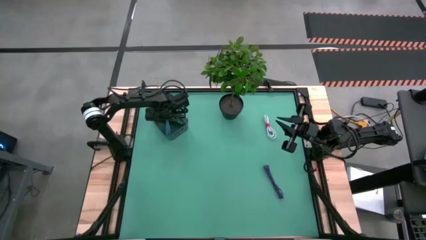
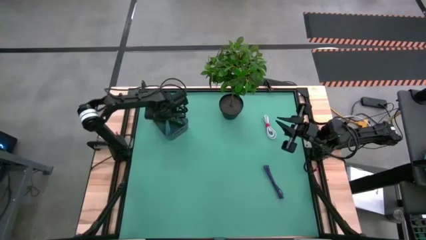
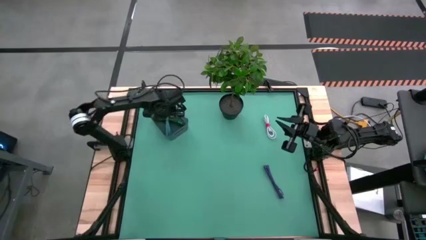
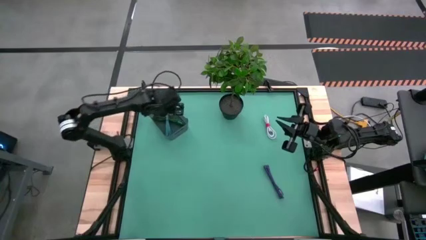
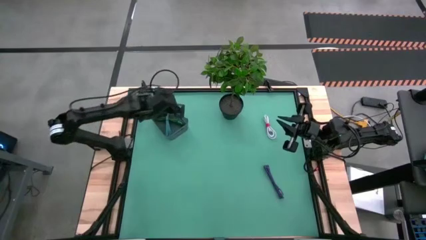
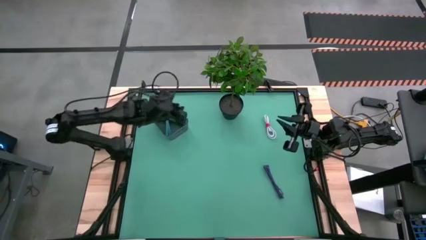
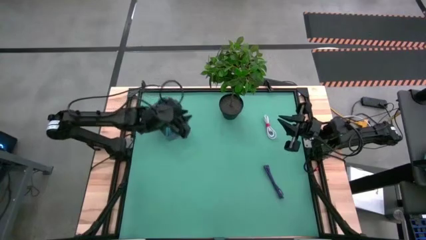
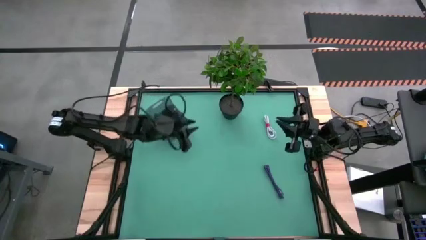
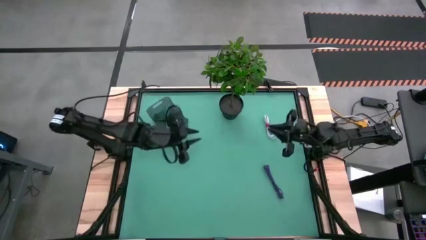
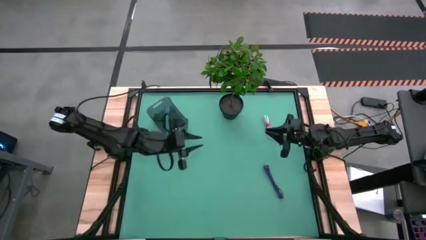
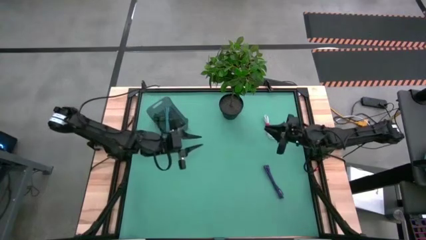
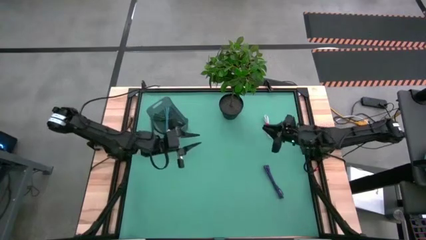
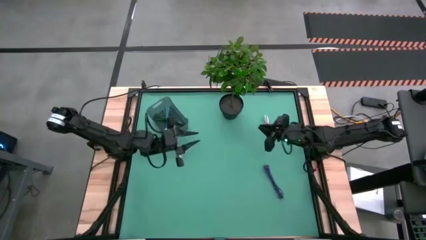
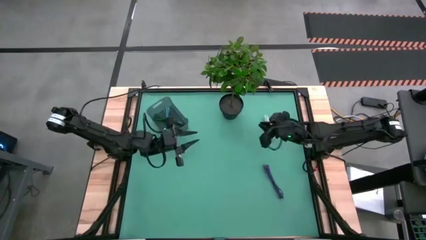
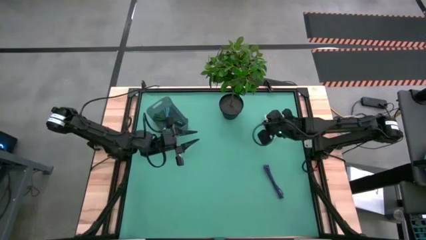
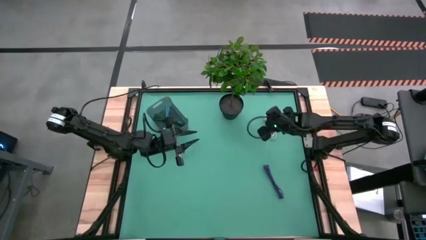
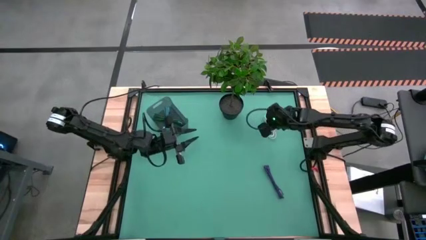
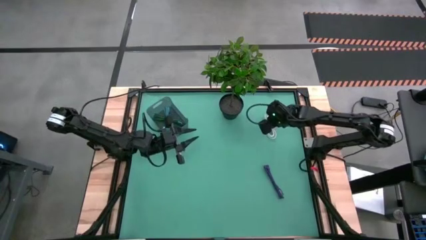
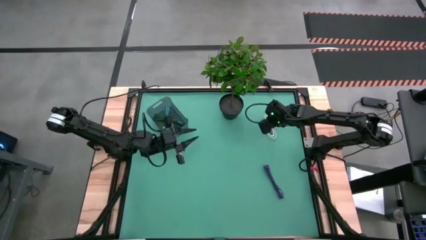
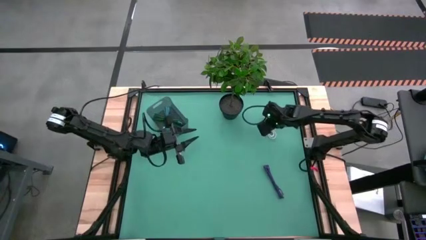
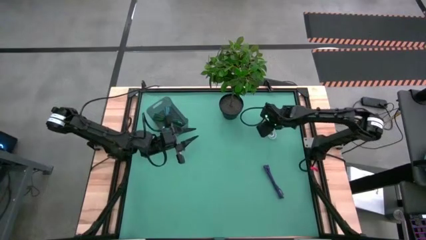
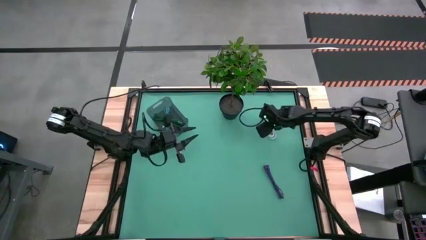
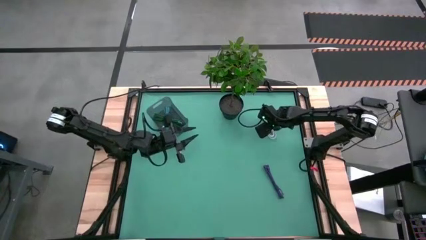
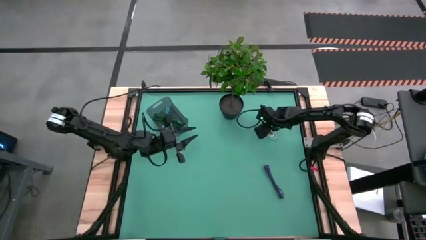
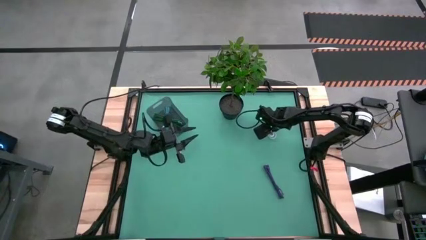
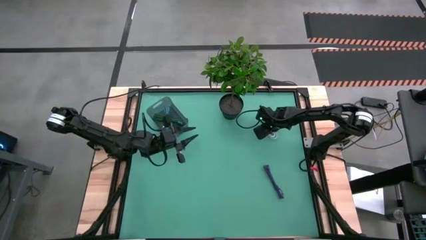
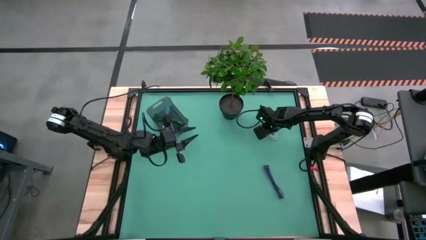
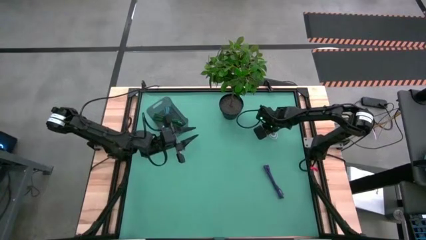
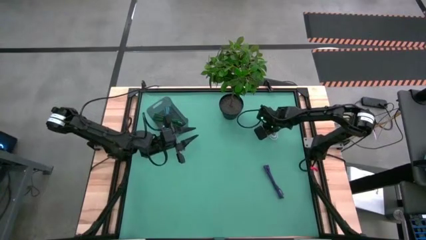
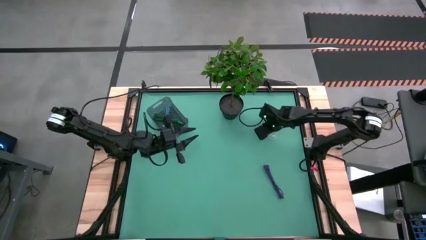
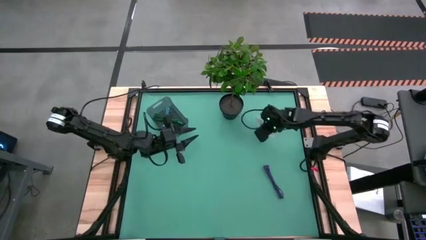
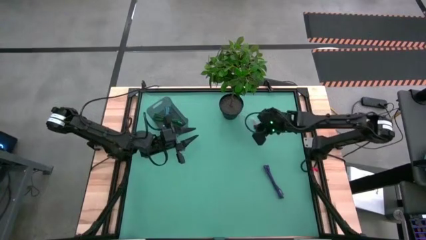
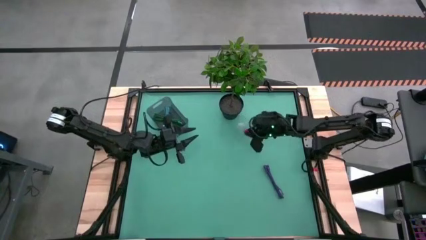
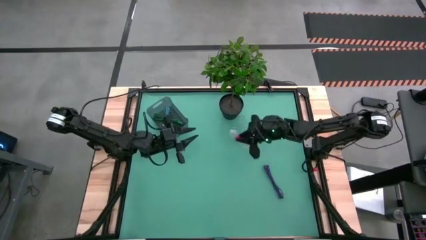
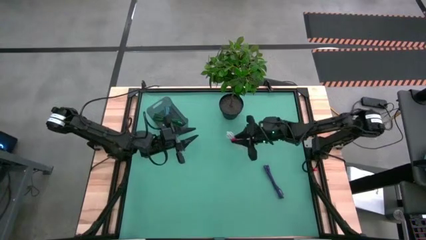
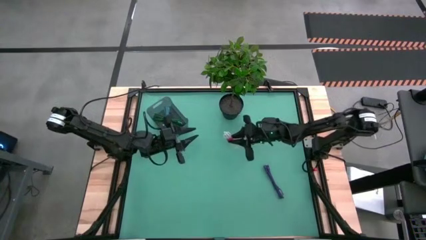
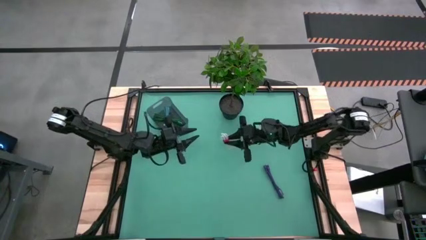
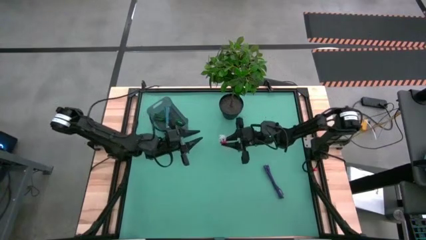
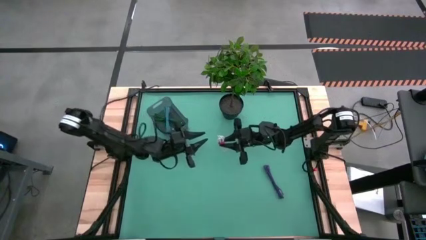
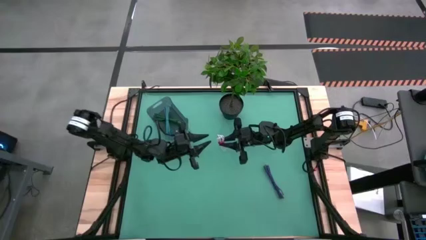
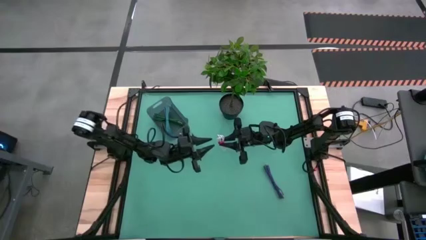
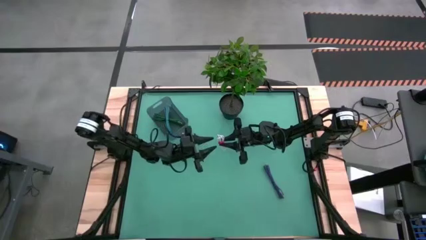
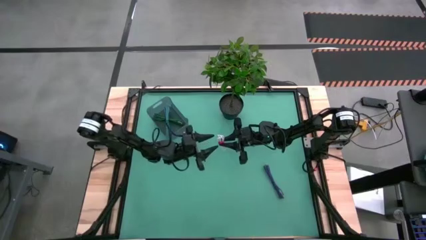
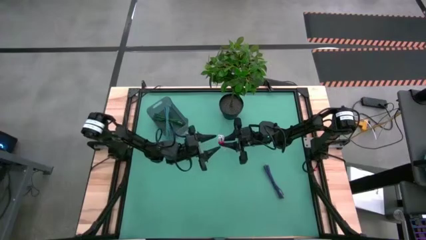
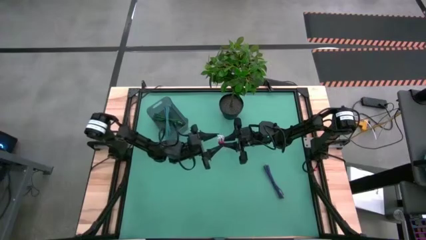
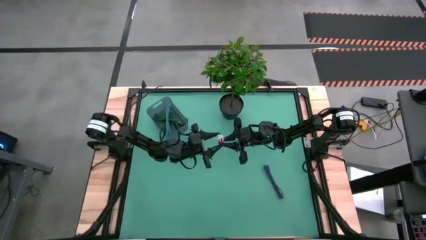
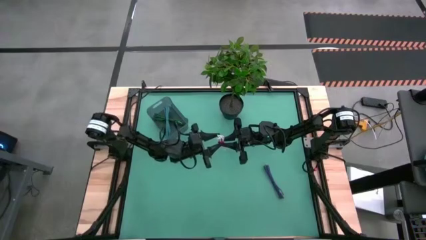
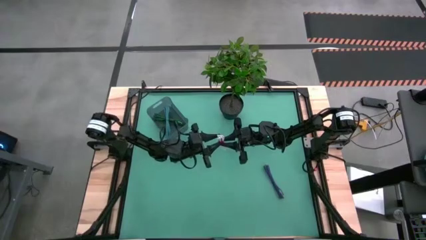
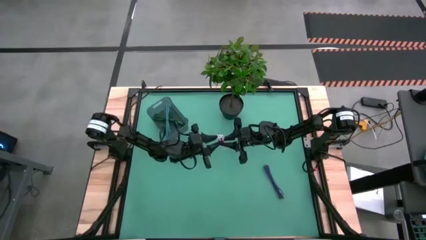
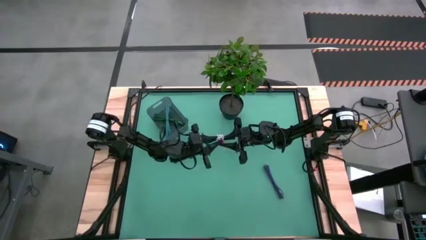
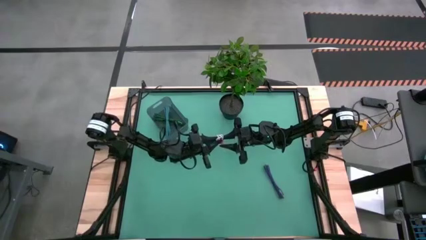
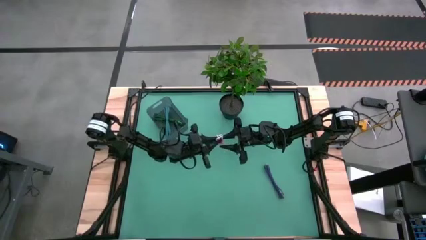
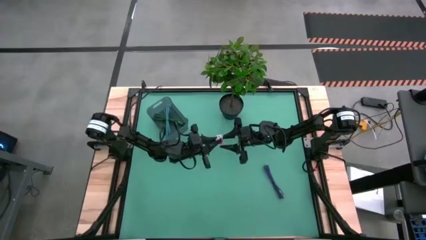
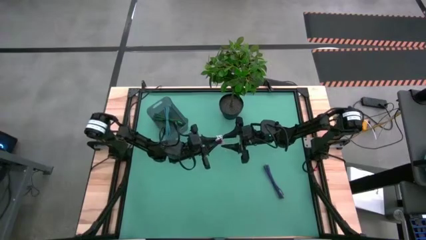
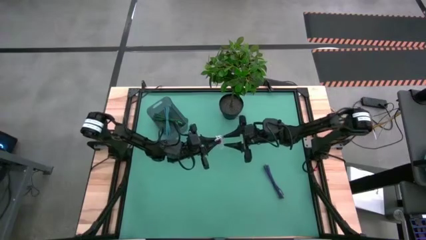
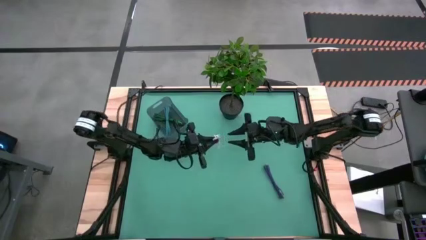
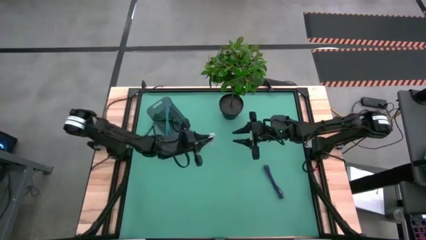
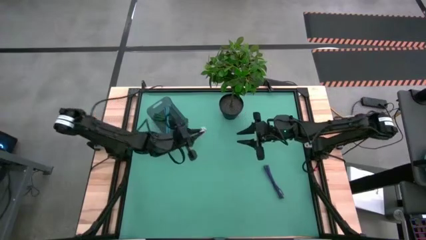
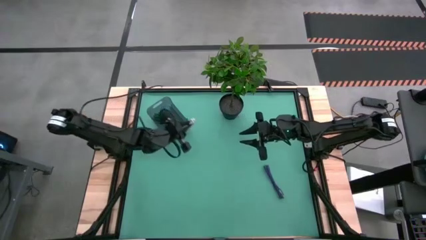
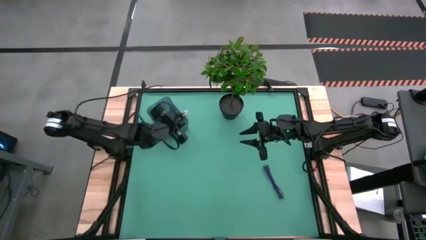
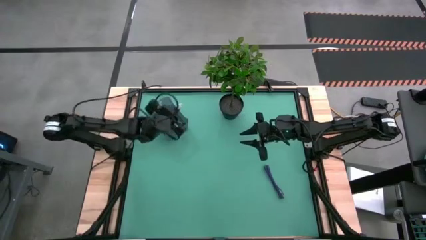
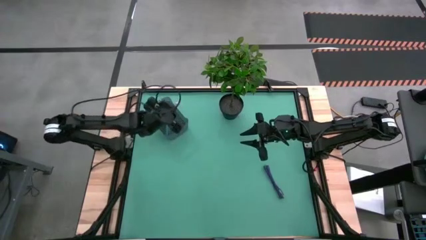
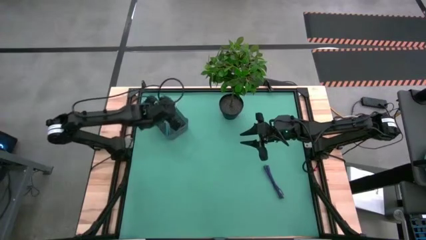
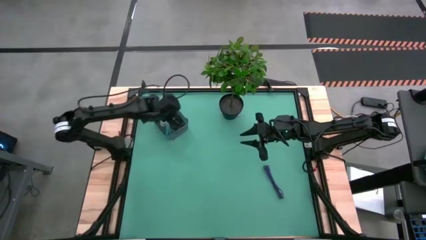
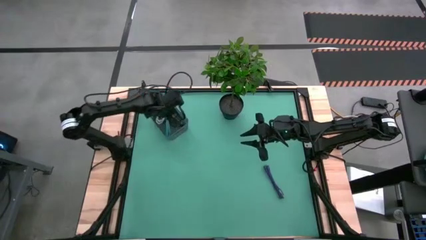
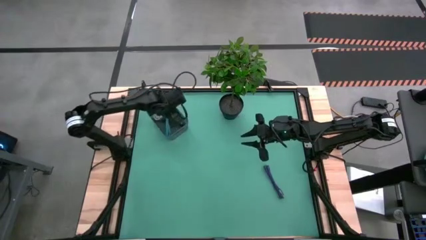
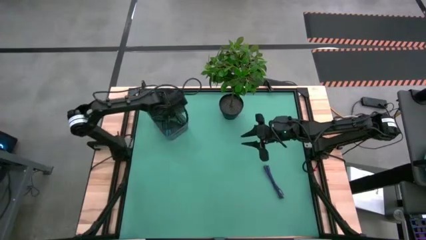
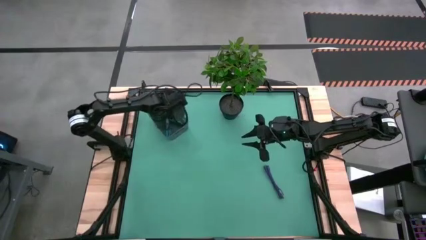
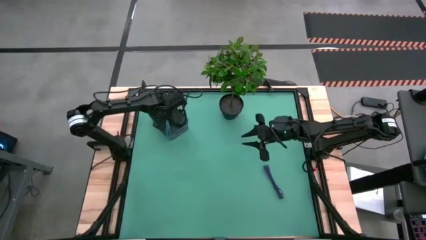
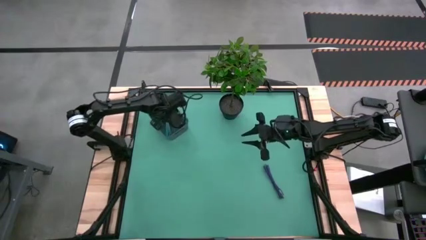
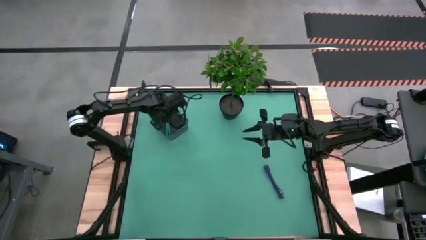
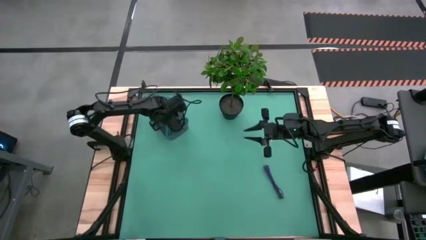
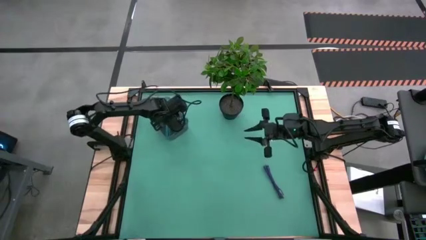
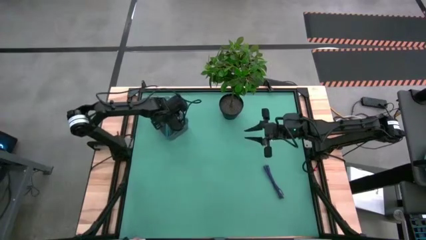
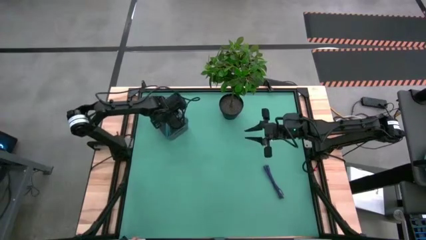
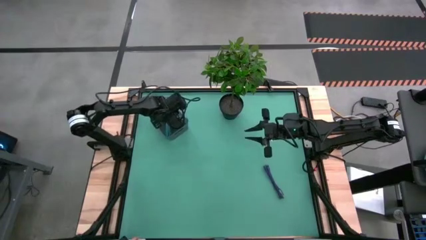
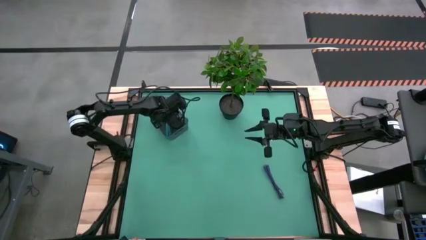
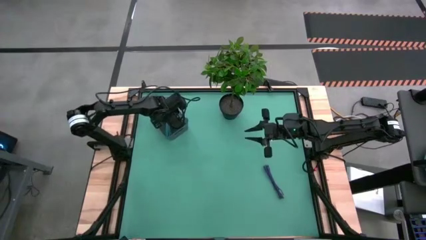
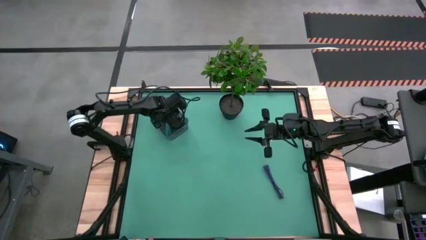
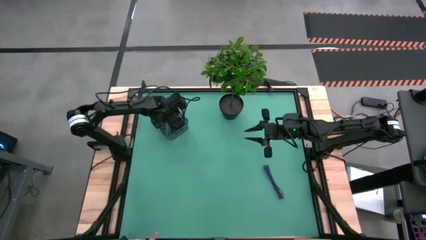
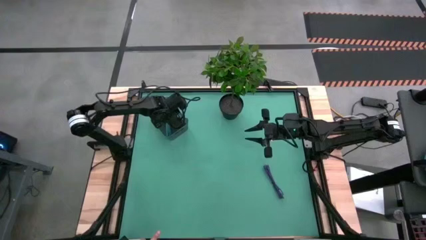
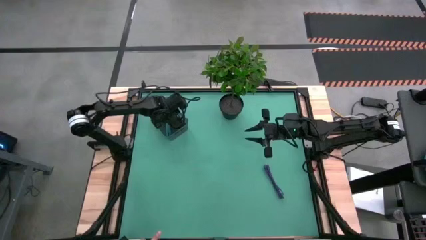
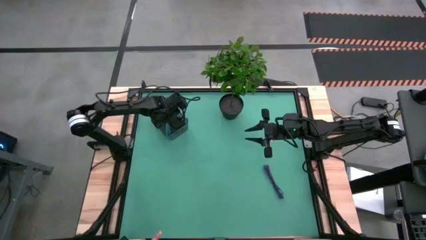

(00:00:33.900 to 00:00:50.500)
Task: Pick and place USB-C Cables
Put the white charger cable into the gray bin

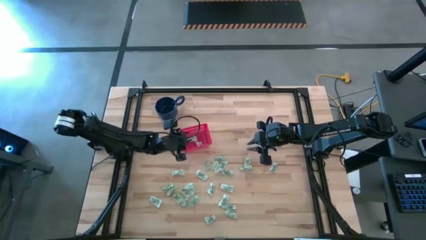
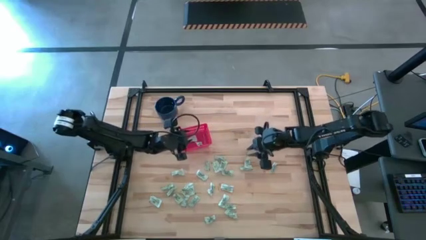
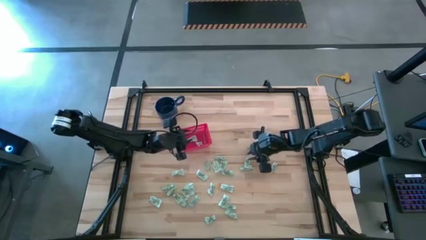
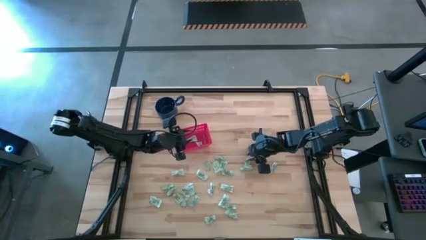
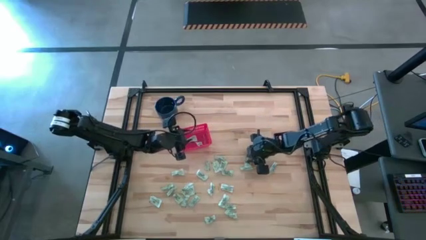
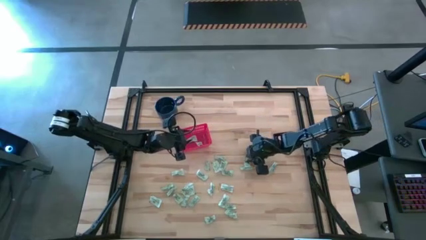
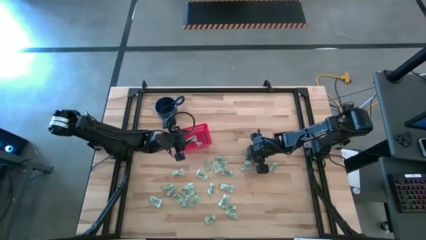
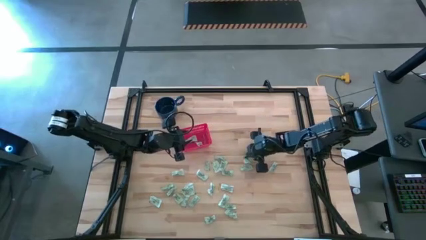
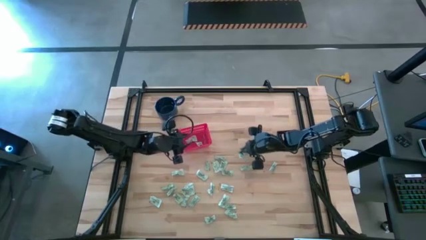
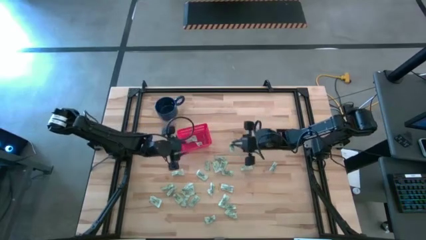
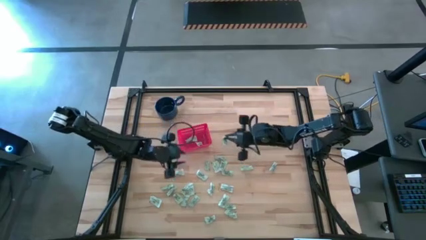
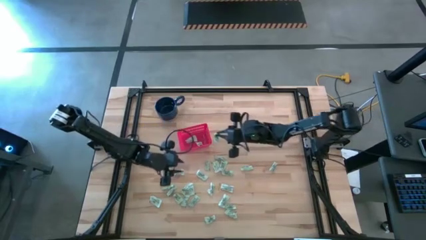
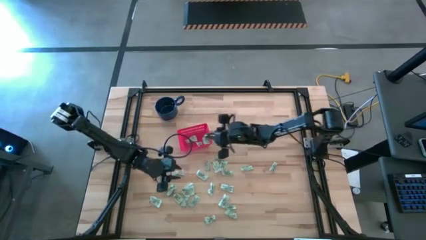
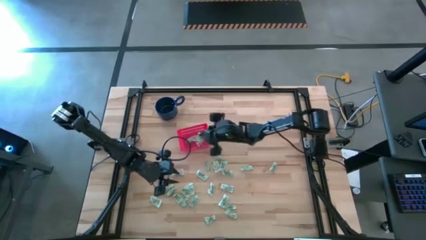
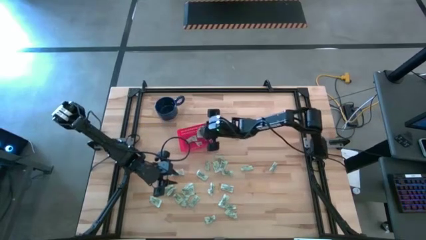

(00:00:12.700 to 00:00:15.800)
Task: Pick and place items into bin
Put the green stevia packet into the red bin
